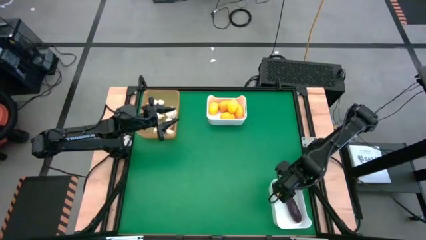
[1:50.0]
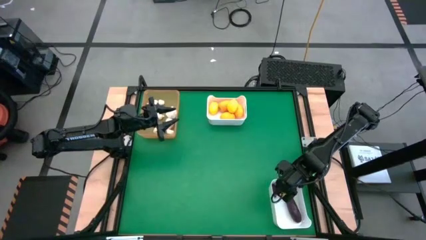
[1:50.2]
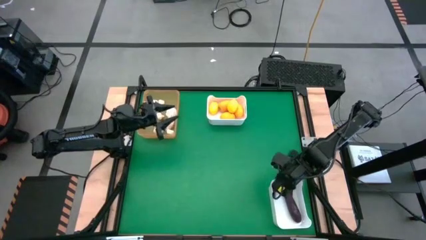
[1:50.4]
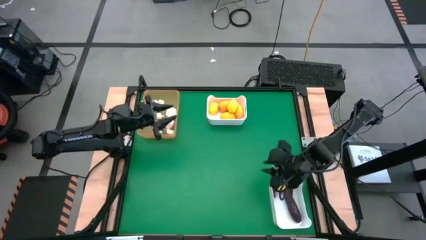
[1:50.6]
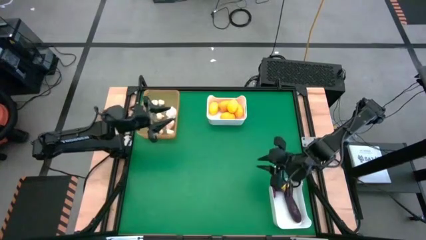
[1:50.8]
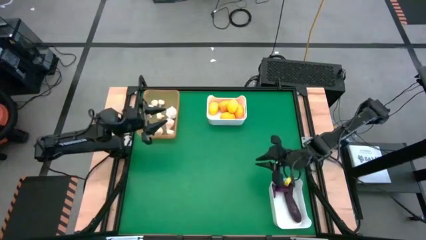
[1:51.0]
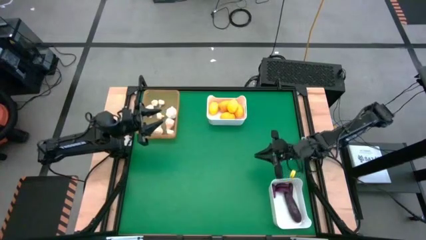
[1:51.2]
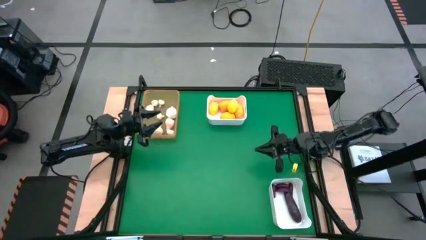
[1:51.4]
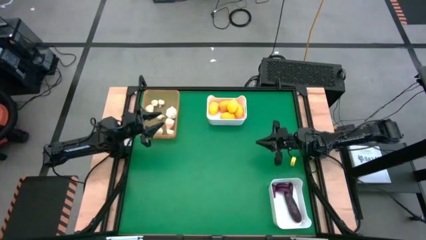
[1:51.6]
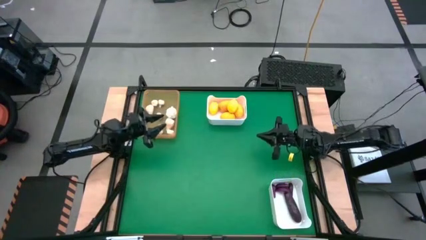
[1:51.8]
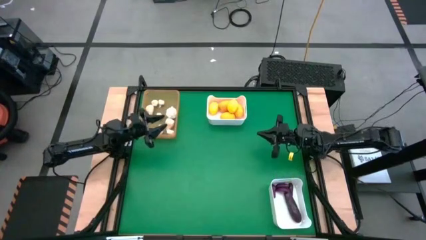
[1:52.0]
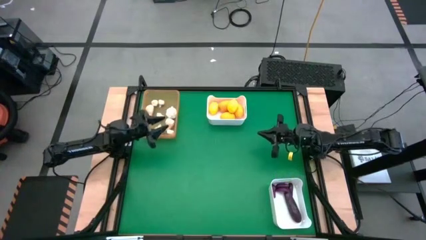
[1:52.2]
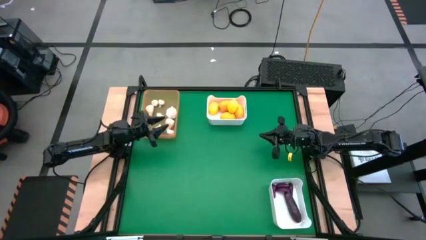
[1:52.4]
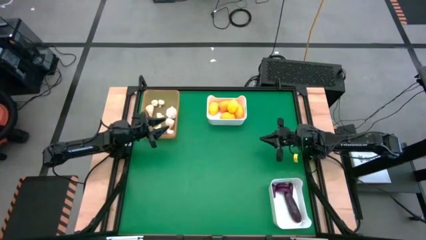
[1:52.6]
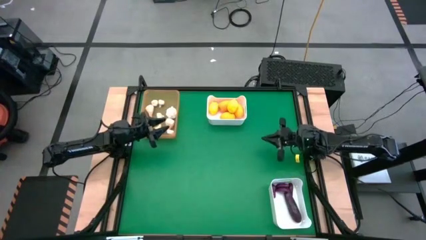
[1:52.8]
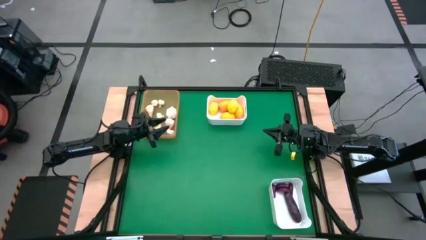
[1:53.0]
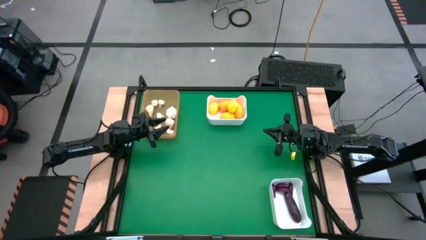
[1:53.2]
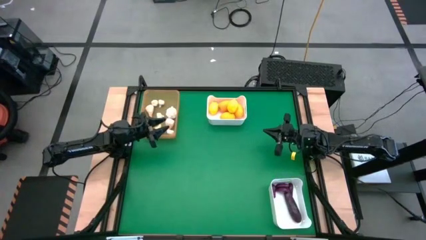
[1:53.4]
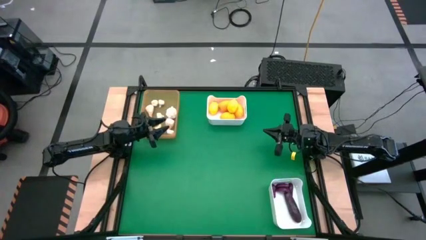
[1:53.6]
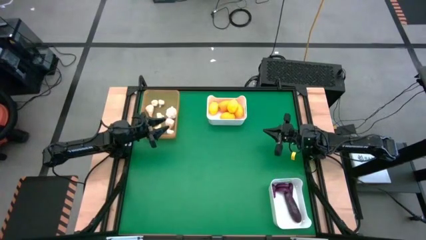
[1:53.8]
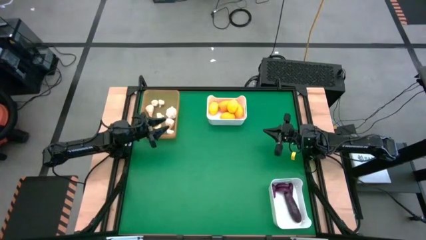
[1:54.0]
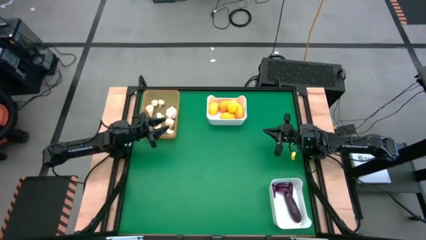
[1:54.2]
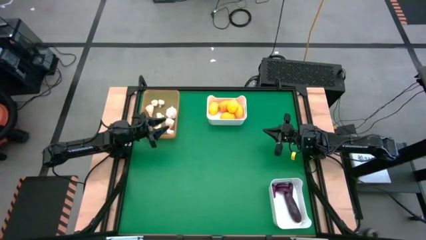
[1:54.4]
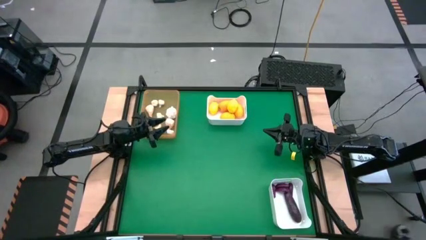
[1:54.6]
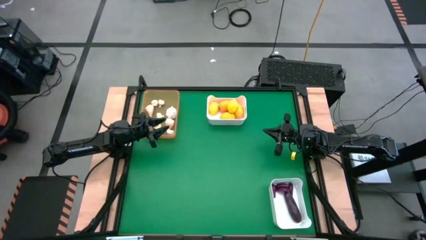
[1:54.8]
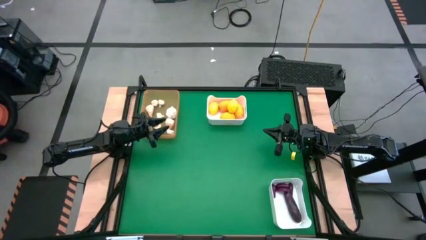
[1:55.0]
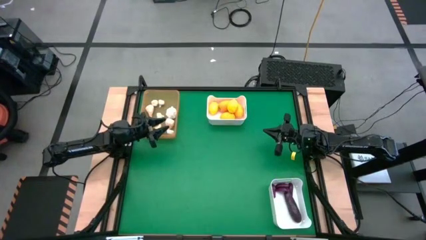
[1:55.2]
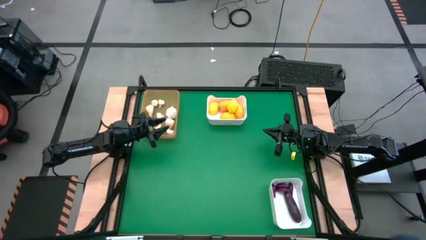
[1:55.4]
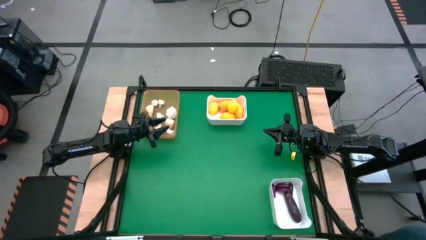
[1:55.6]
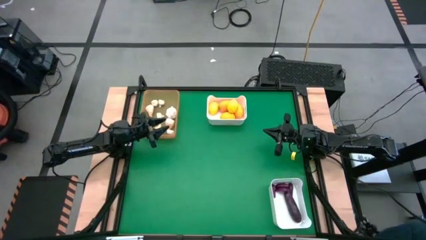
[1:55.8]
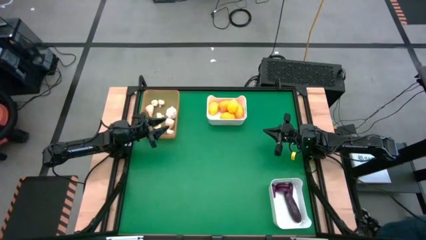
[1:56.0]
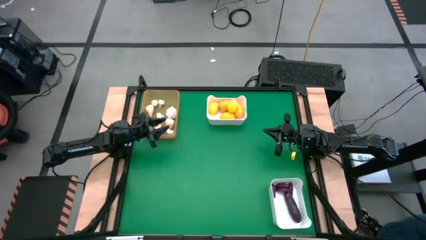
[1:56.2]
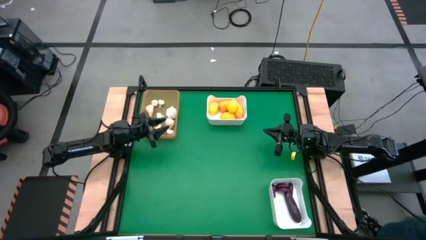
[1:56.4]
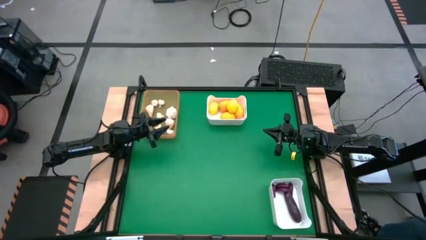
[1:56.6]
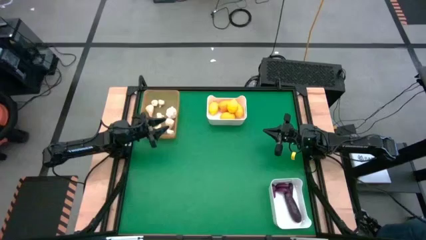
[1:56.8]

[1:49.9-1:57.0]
Task: Sort produce into baskets
Return to Home Position

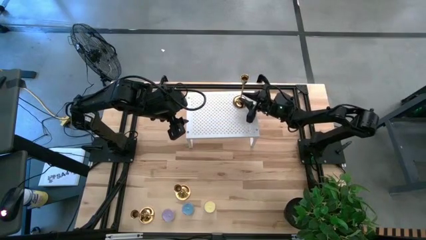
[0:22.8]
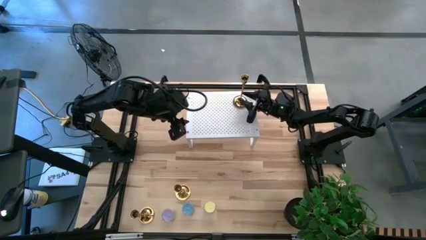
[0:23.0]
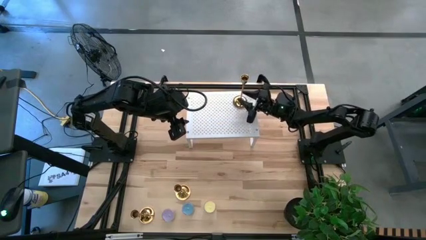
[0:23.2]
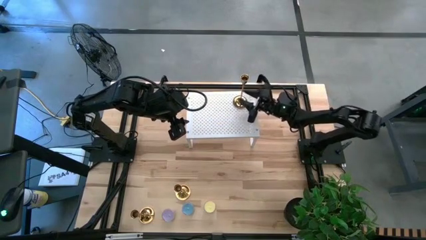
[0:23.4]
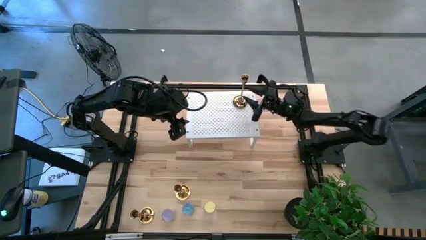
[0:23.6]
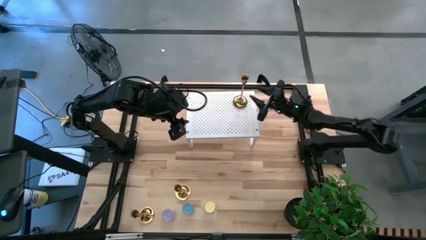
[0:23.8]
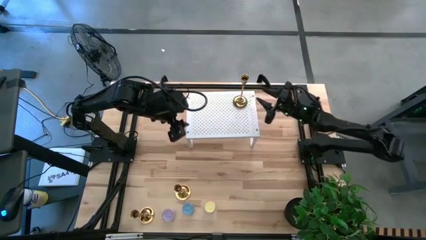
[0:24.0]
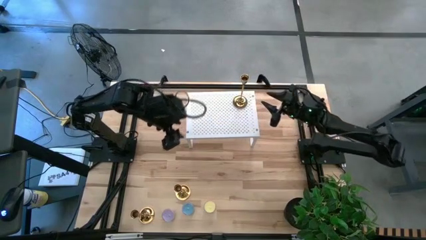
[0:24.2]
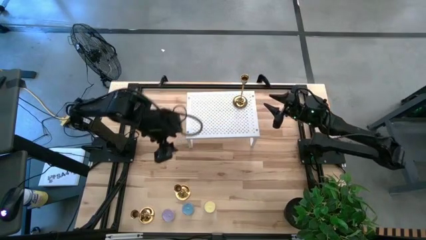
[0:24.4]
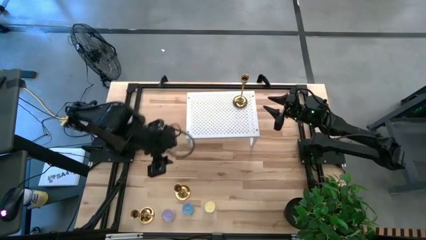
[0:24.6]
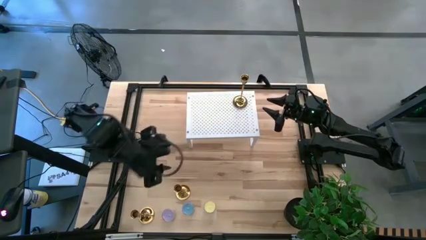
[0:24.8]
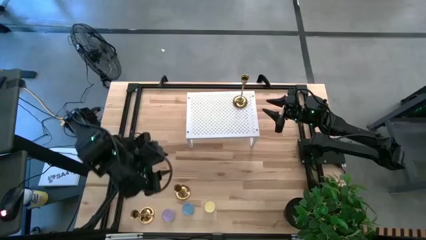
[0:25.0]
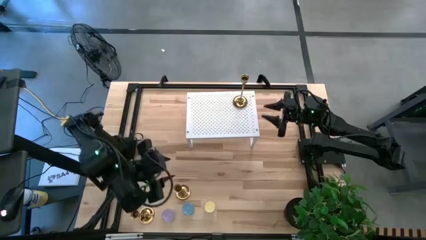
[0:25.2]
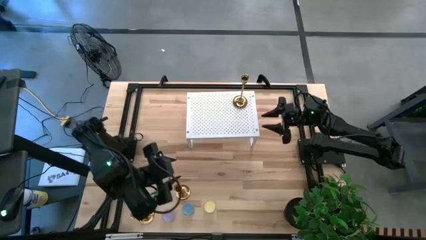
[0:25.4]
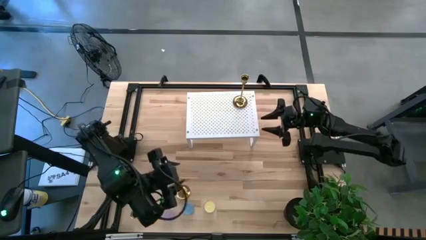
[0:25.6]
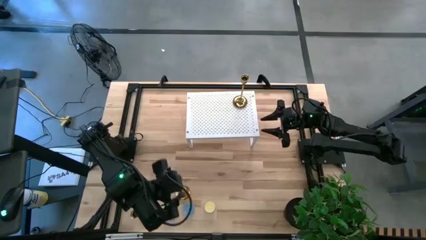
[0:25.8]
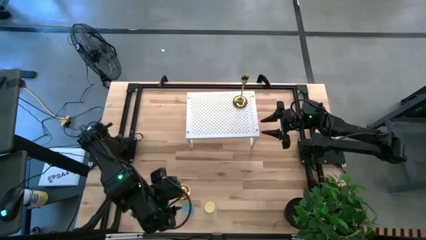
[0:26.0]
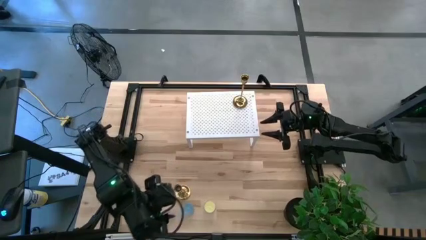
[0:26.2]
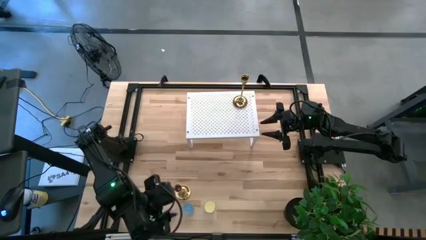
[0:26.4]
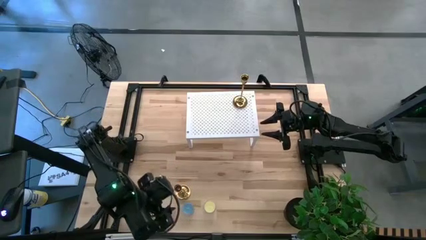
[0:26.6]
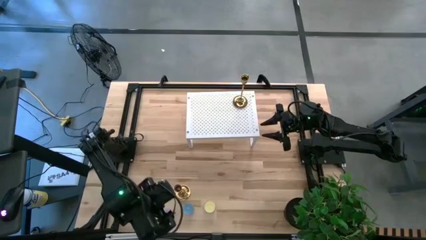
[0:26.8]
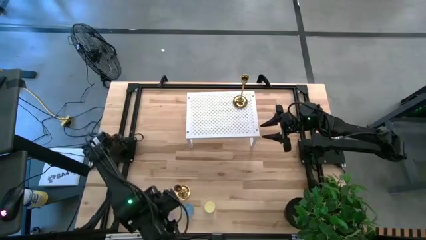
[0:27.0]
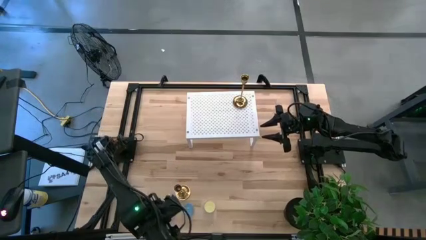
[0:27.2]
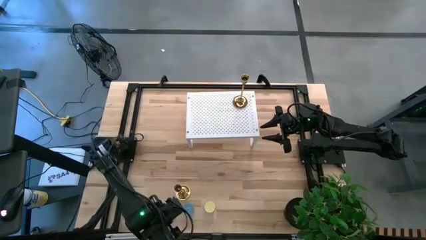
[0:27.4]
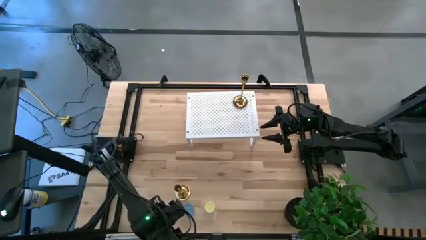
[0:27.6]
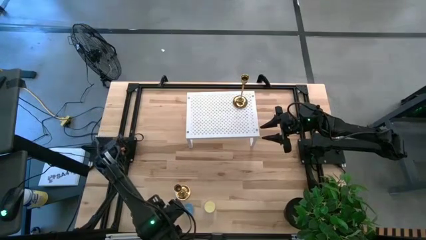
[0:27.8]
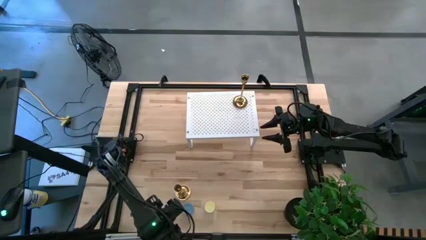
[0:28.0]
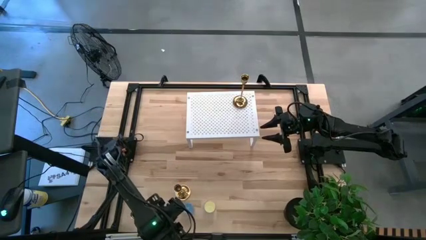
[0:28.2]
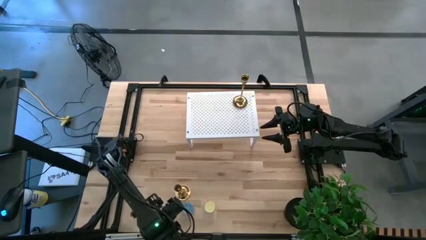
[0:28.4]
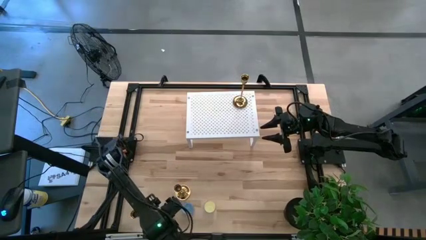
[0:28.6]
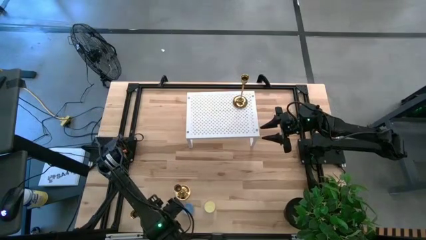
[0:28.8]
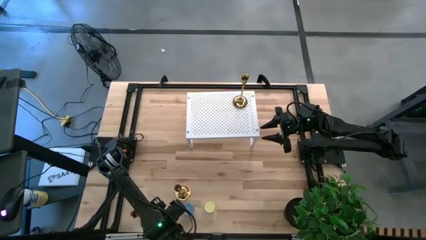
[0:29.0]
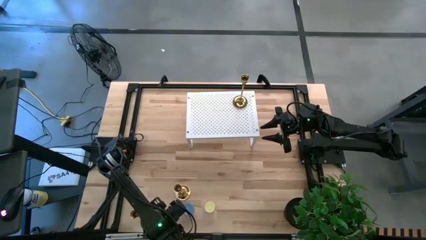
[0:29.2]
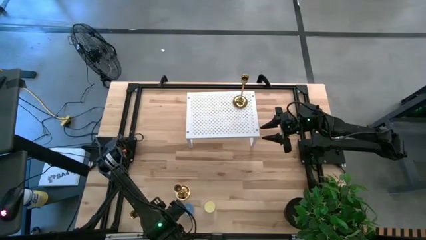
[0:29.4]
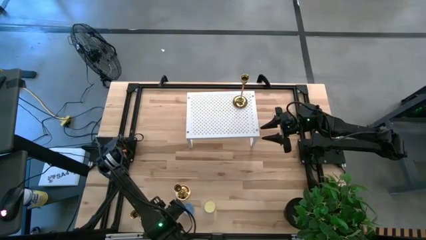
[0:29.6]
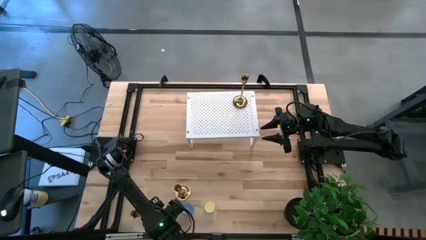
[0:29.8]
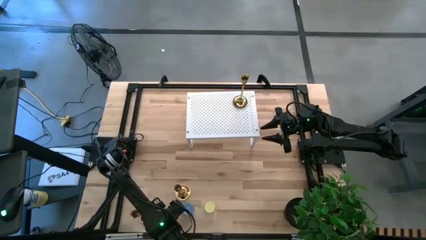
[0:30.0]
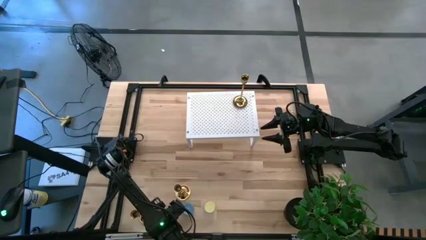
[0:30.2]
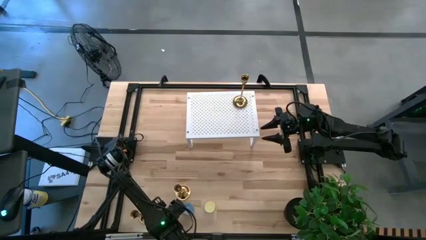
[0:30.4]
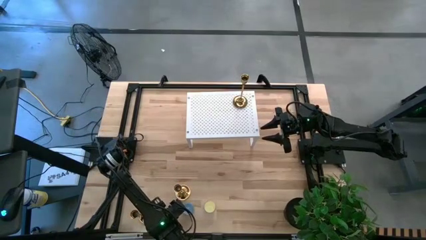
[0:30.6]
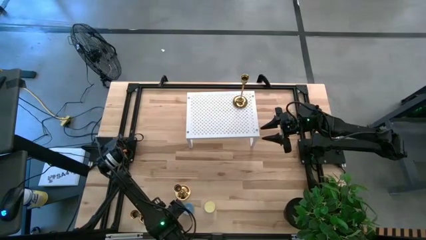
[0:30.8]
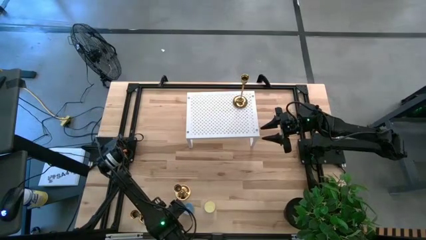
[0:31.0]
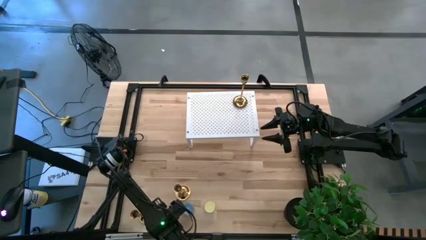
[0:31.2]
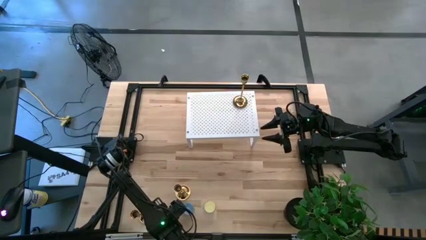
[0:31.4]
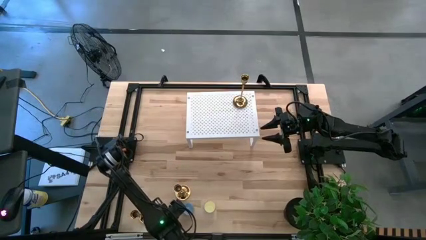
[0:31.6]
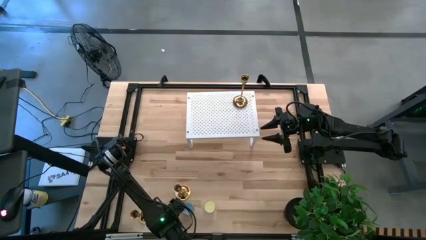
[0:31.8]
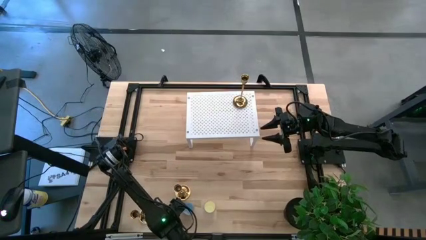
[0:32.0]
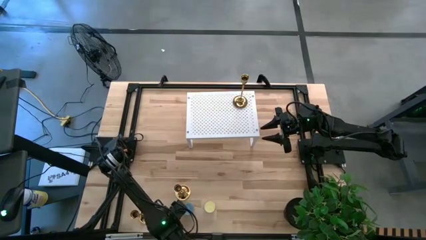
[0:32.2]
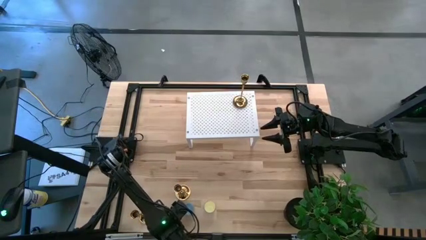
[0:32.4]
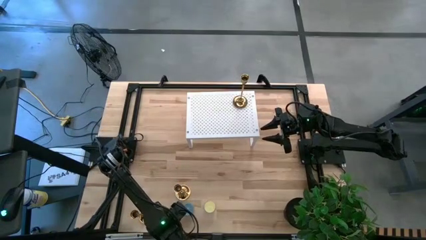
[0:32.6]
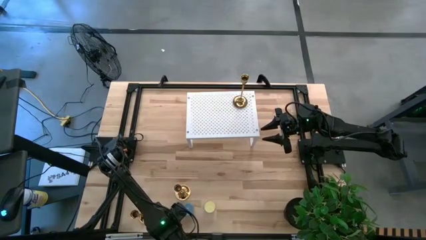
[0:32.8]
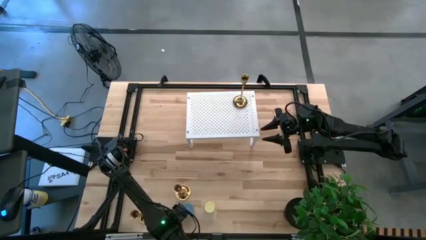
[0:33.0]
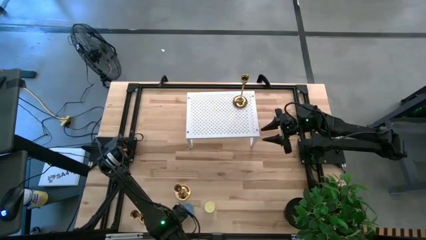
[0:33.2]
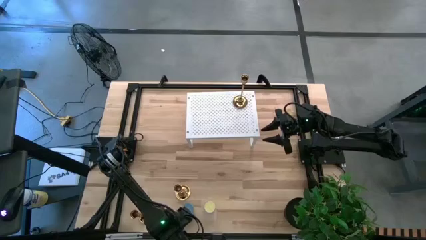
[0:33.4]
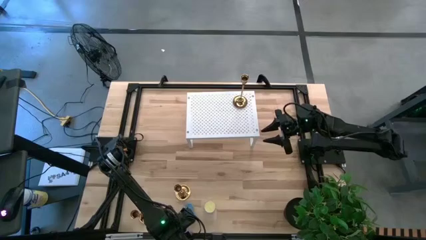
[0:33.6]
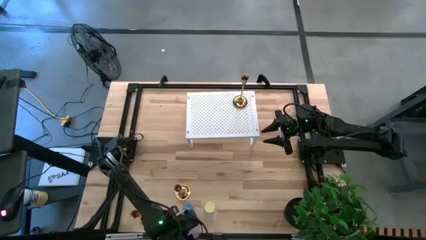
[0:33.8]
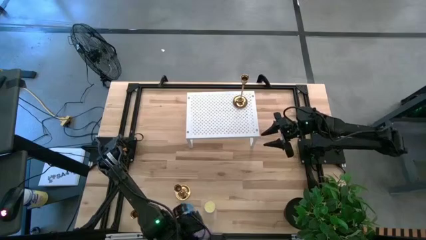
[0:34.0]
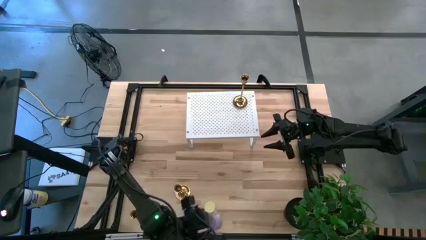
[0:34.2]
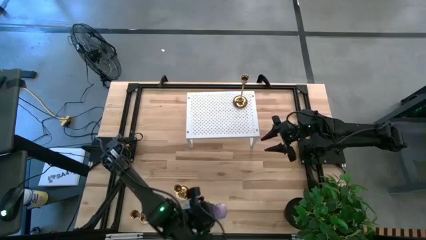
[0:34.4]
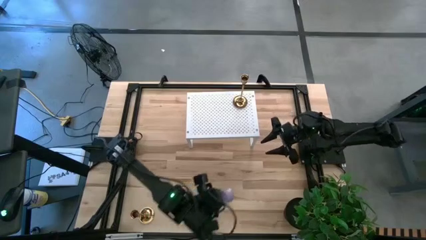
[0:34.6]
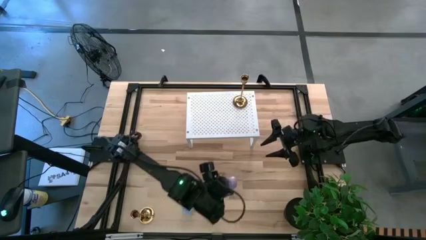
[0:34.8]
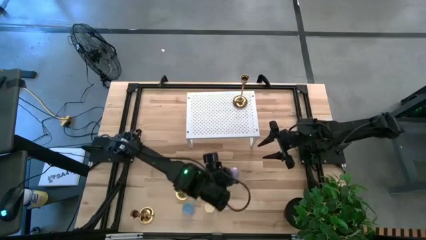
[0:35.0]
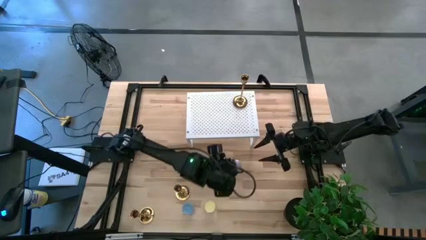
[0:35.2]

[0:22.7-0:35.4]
Task: Pick & Place candle stick holders
Put the violet scented candle on the shelf
